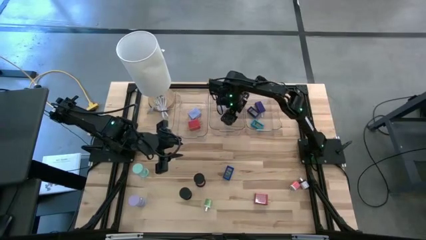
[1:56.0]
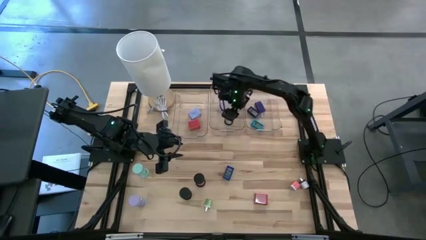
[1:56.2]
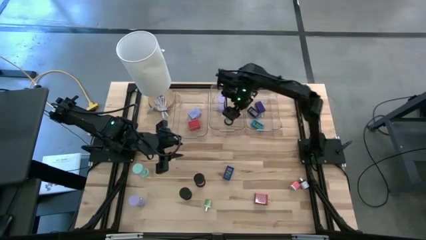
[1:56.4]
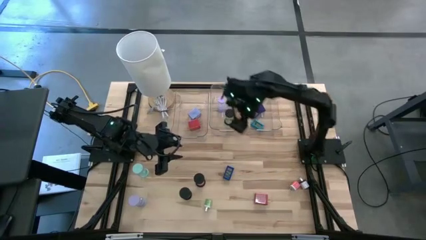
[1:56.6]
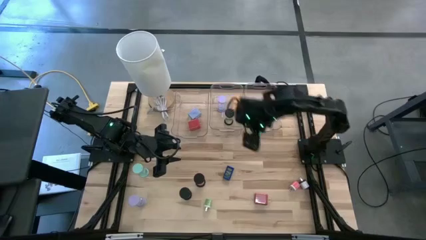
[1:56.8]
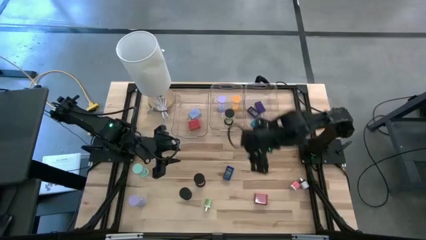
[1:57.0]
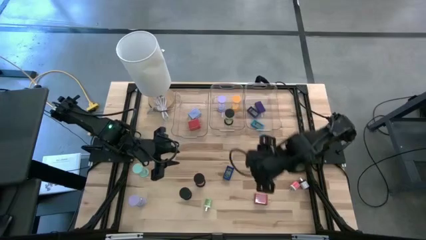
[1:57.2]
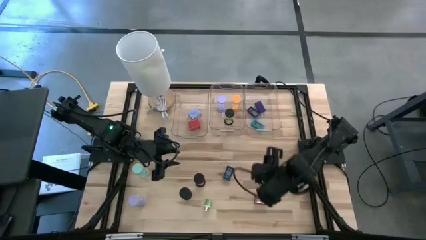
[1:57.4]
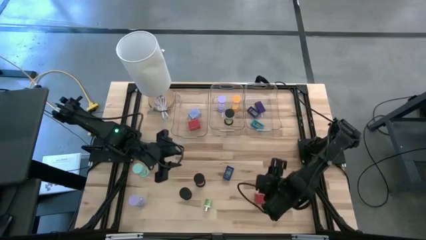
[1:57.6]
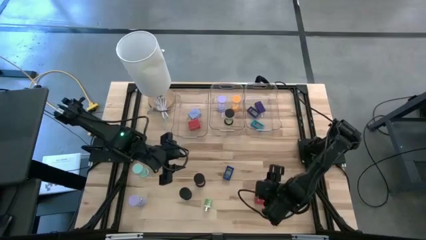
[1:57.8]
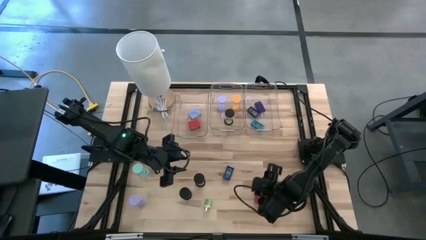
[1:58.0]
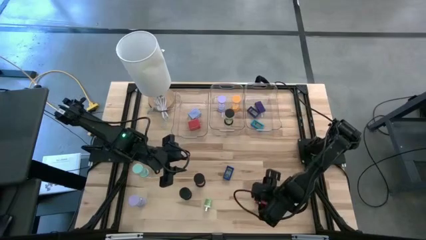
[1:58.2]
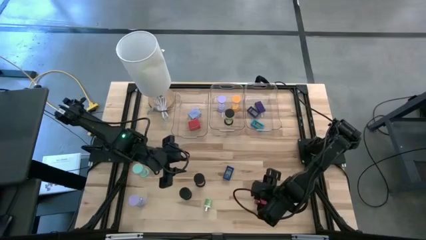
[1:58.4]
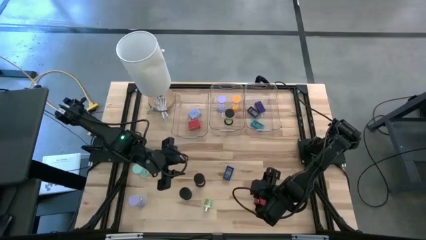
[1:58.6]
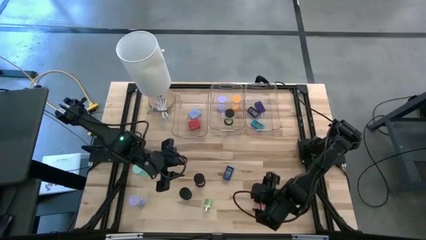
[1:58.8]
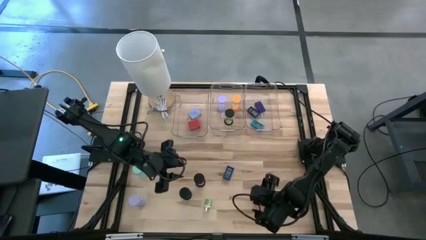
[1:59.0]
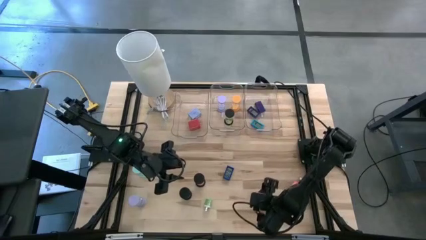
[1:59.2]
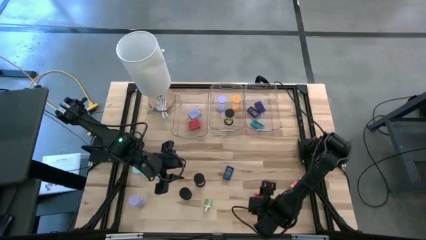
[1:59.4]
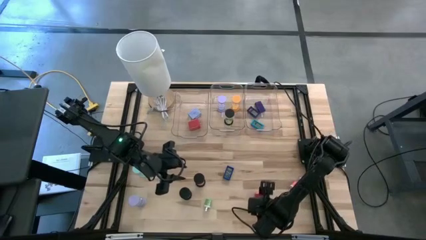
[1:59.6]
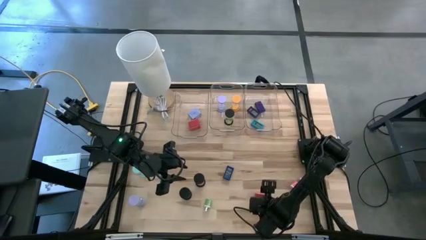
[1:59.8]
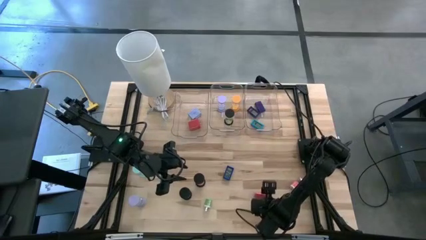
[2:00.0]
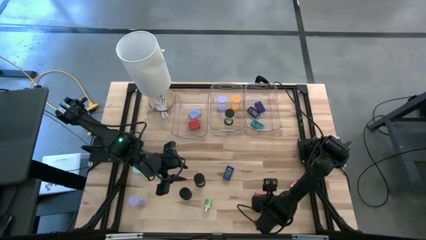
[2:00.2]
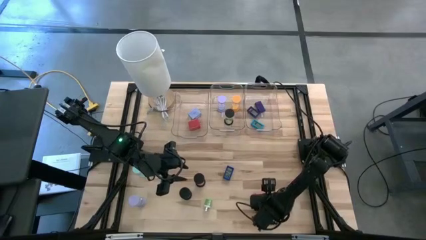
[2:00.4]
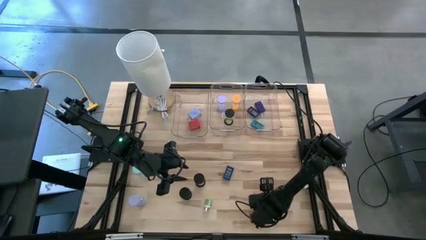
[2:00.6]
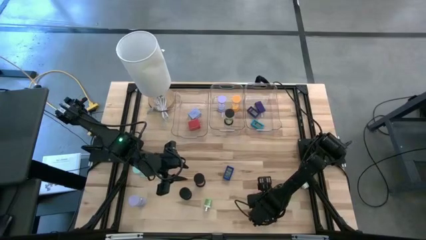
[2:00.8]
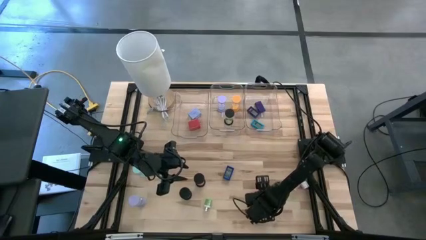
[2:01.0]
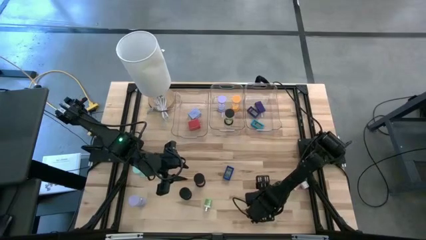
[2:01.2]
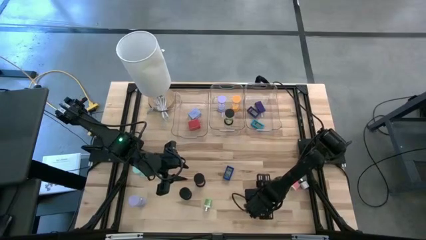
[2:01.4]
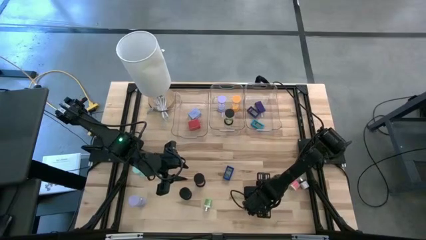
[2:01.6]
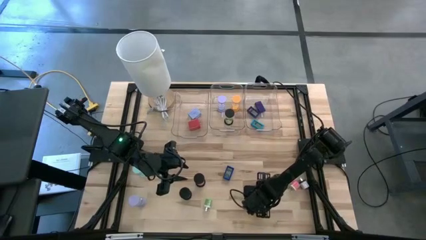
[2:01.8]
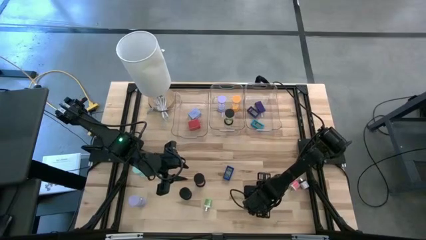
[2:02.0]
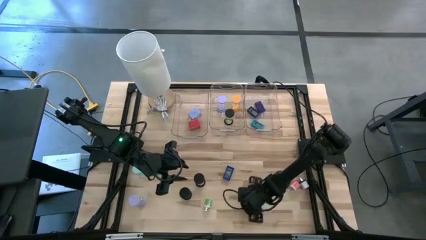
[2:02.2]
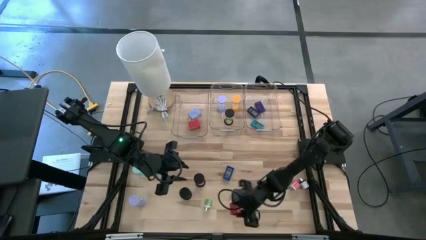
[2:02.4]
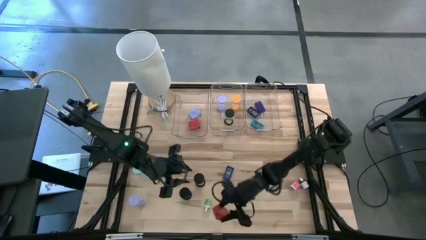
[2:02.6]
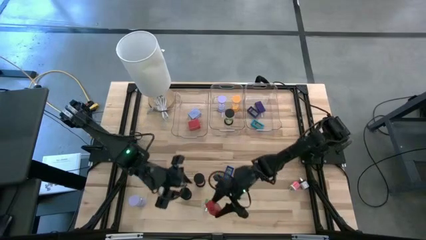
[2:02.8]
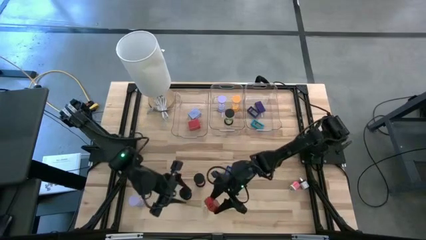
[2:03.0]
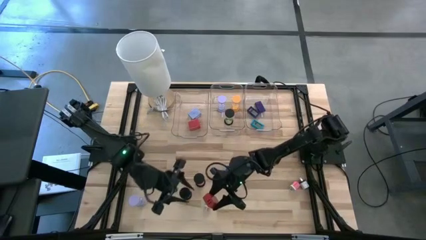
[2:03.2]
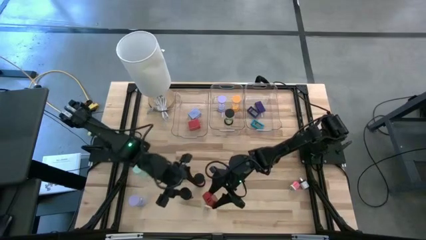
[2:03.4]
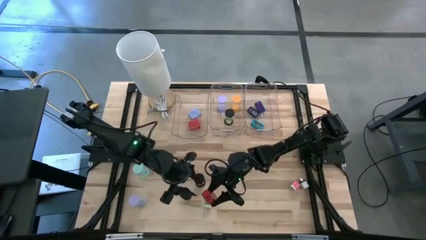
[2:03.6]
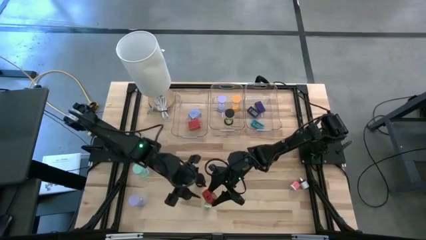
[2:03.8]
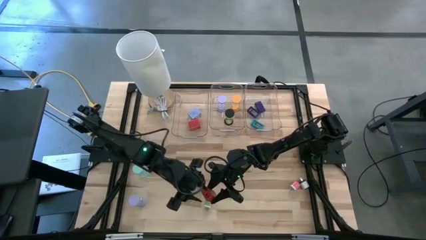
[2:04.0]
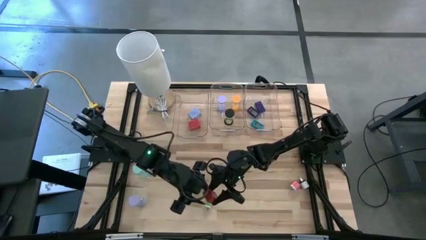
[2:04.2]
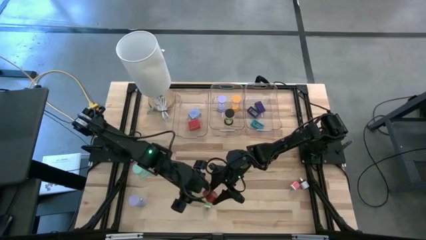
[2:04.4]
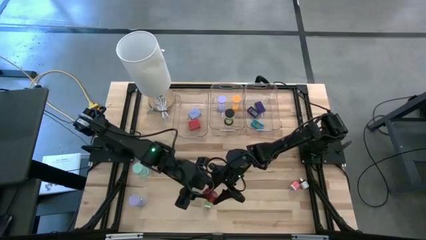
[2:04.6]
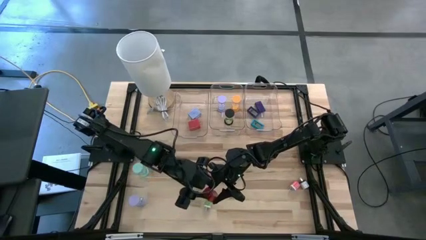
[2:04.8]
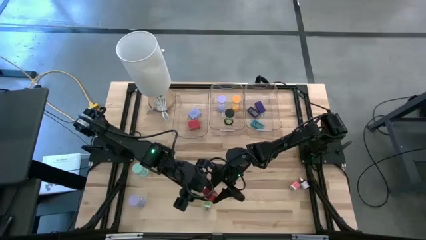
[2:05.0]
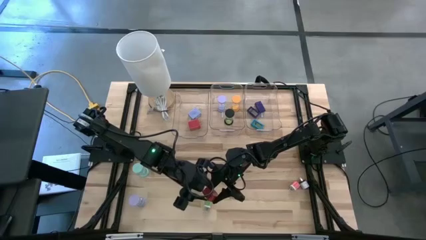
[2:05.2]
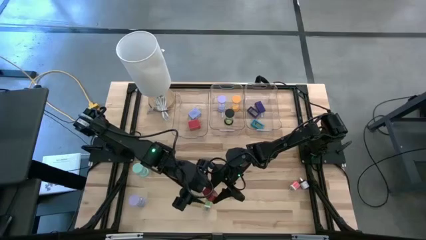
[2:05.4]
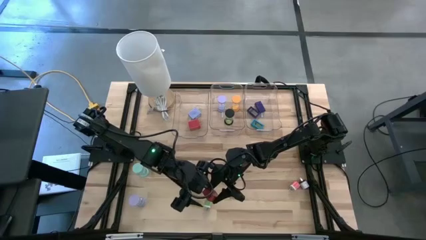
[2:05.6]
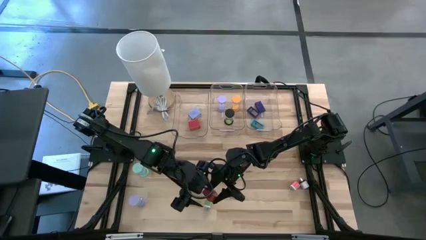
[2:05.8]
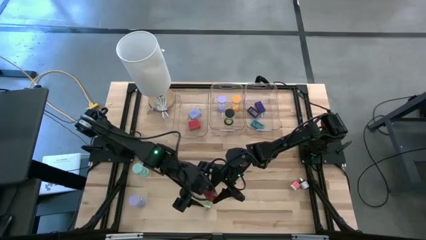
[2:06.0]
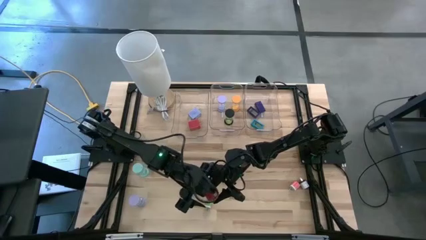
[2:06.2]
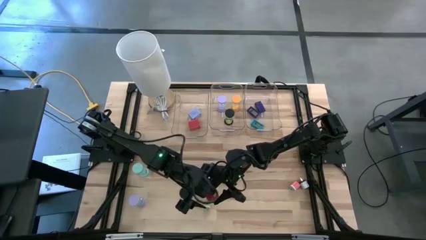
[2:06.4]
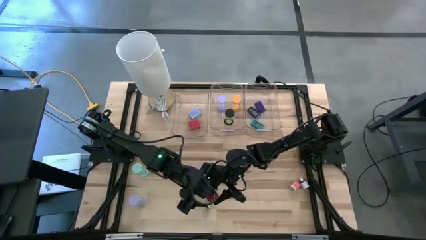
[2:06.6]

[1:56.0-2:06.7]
Task: Pick & Place Office items
Put the red charger adapter into the left transparent bin
